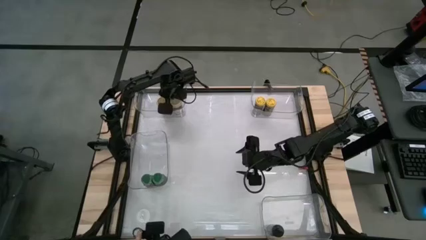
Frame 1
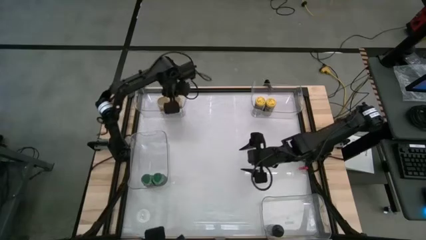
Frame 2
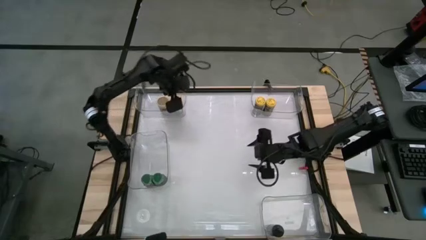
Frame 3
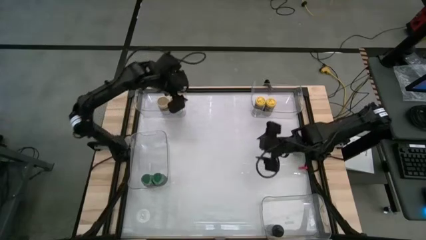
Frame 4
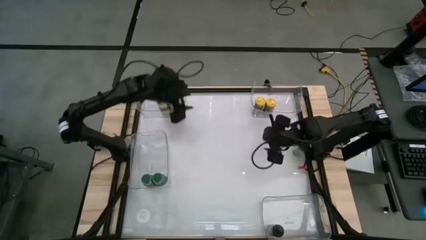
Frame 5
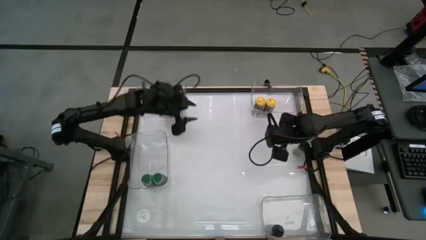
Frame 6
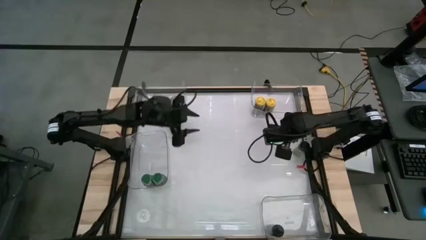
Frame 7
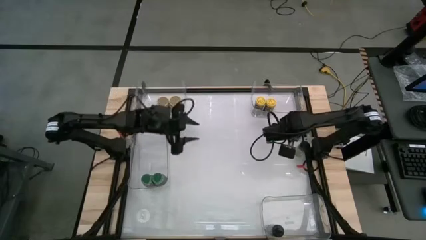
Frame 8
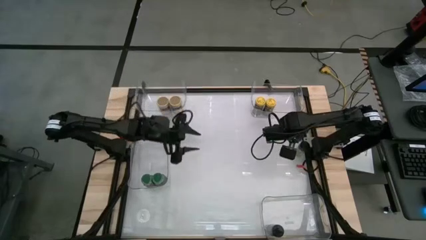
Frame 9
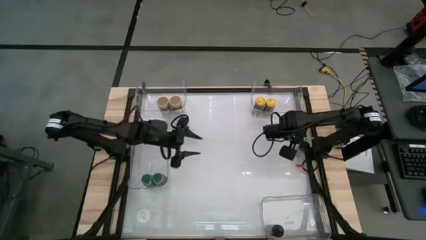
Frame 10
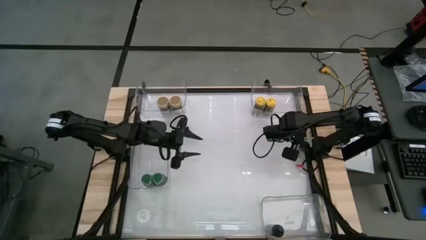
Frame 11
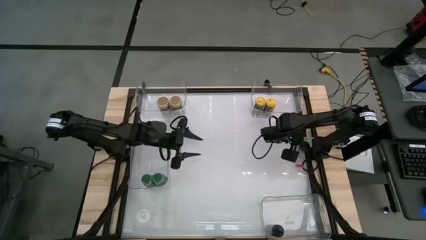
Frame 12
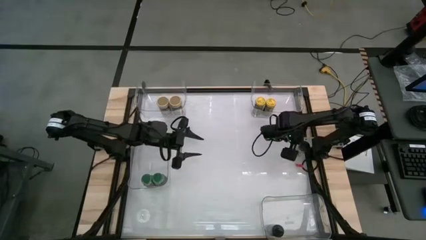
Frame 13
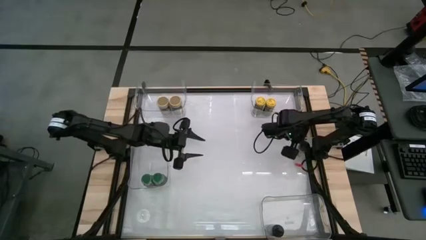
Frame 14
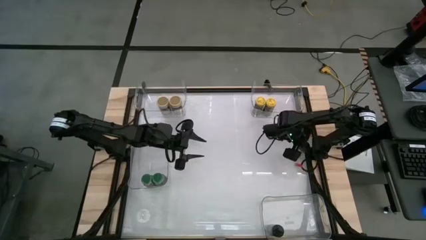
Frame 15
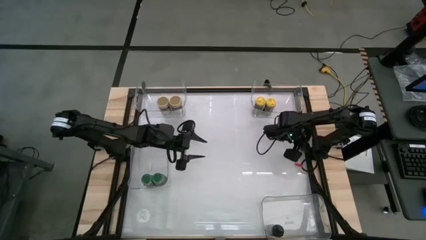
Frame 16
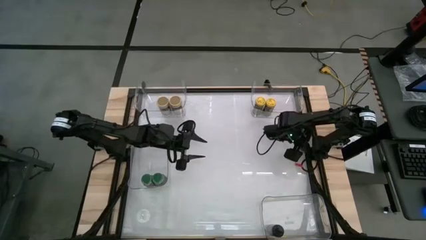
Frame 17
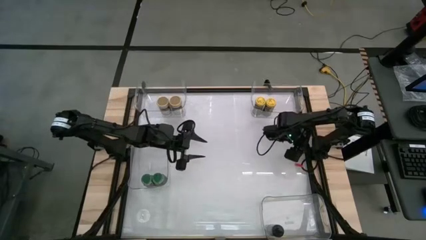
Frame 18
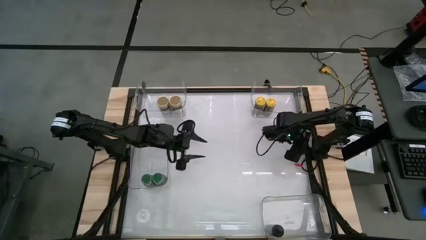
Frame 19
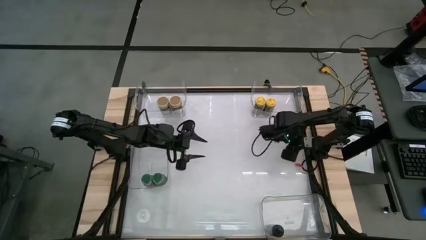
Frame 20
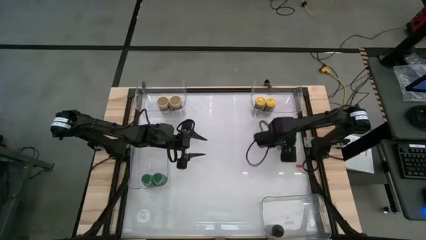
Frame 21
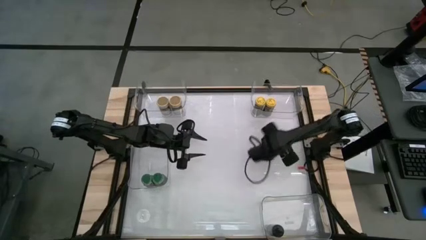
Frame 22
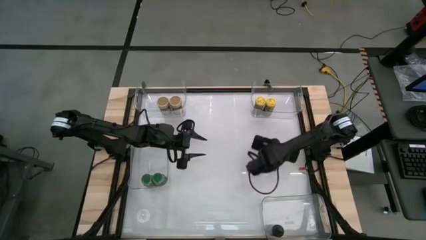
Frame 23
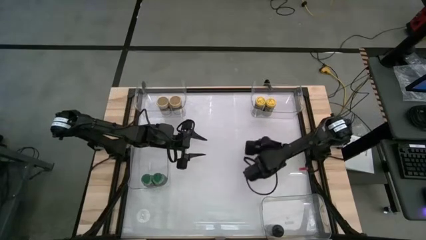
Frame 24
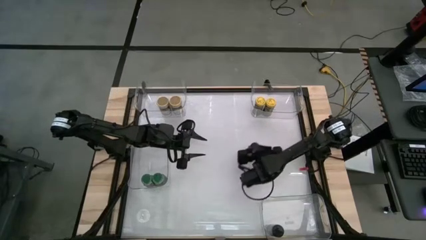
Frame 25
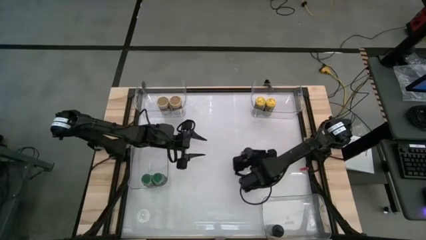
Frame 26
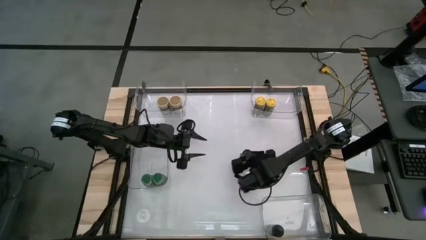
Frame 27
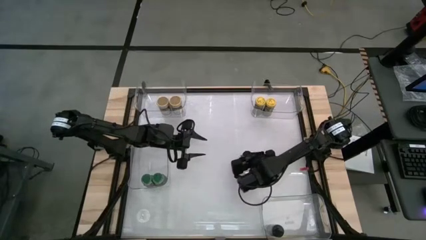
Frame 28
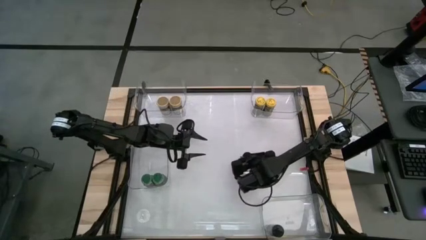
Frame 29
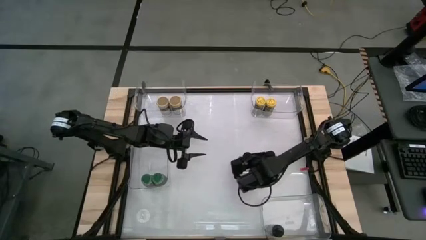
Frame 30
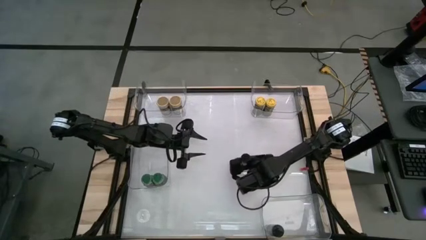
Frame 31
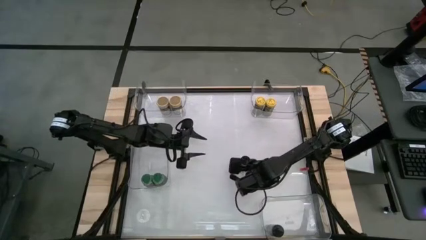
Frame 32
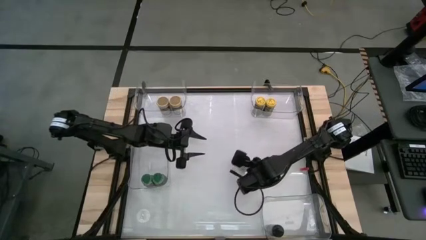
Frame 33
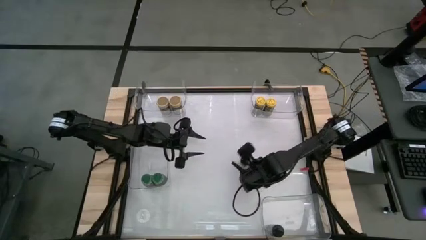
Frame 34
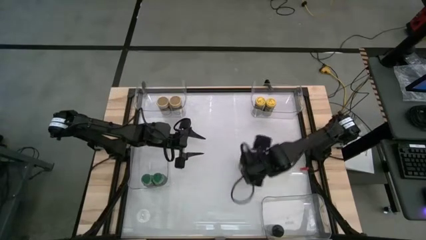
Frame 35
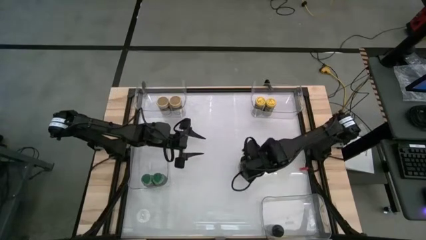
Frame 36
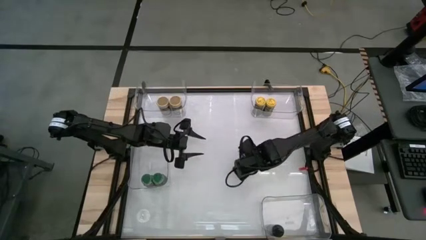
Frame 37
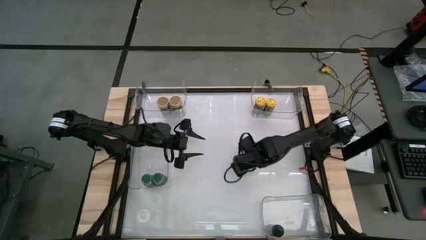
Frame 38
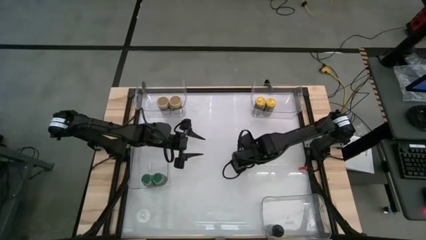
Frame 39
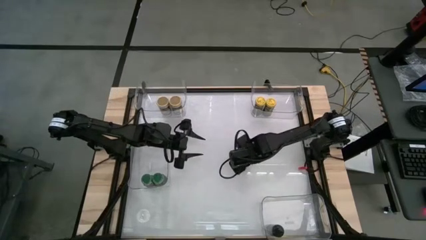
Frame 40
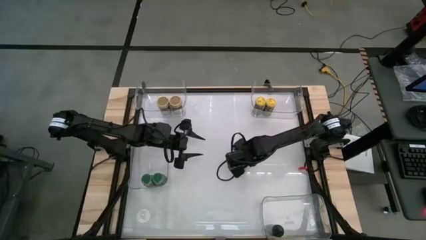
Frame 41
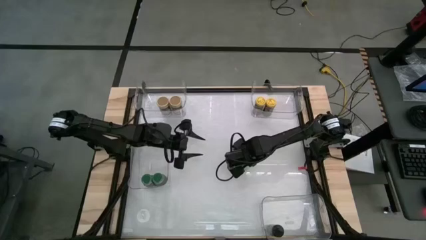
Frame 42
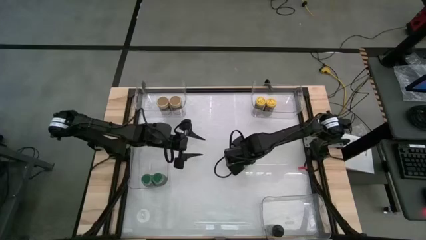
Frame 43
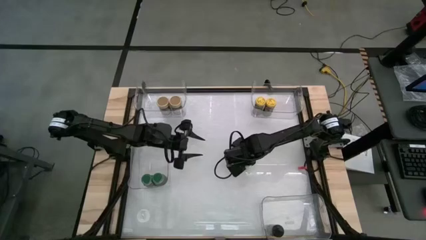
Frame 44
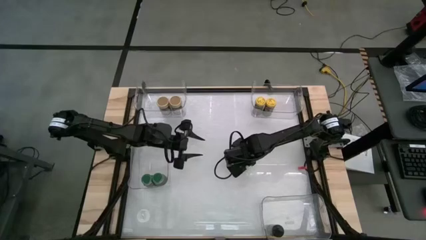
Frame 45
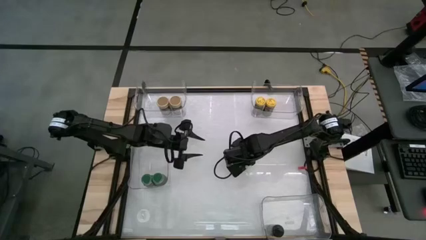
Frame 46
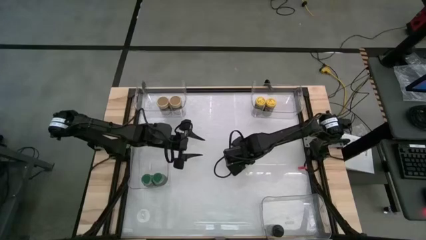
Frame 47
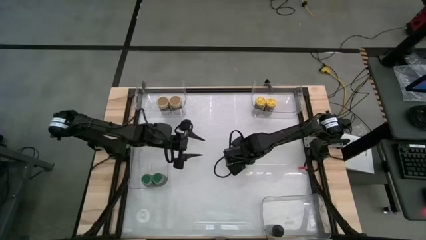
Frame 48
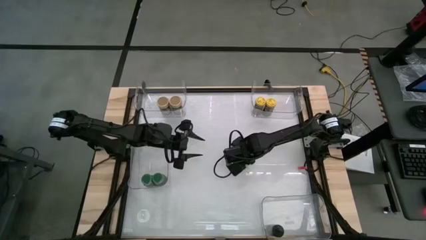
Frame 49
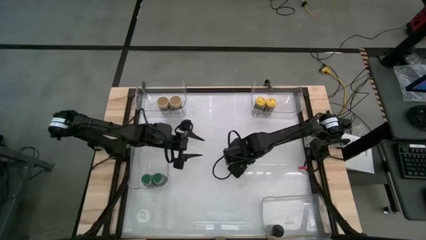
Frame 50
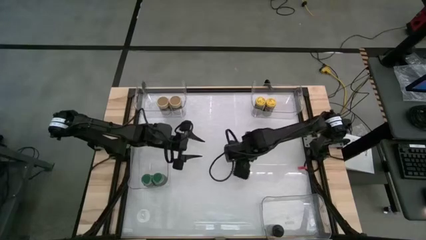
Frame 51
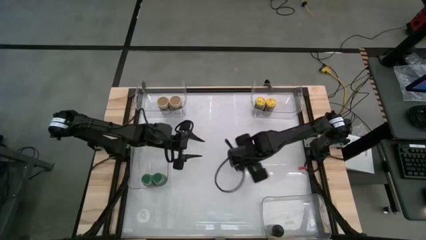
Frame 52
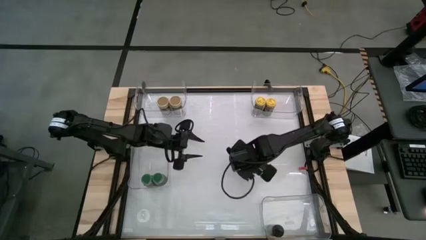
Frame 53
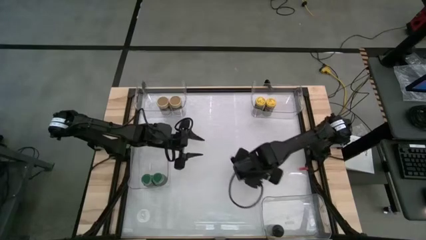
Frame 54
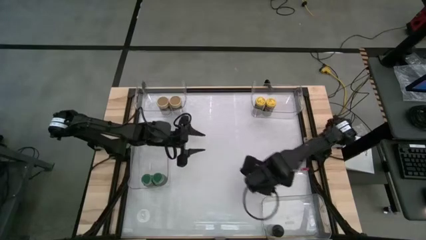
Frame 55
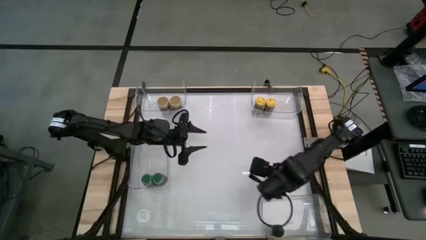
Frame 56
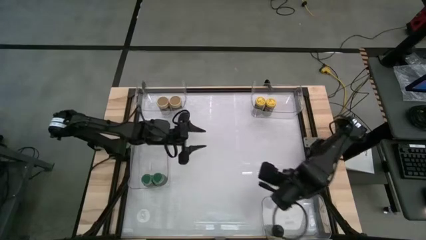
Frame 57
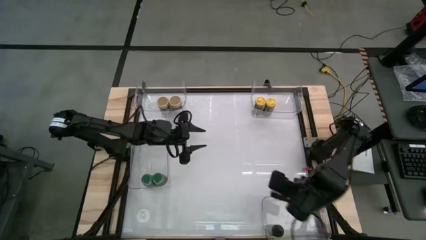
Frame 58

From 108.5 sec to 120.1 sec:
Task: Sort spices by type
Put the black seasoning bottle into the bottom right transparent bin

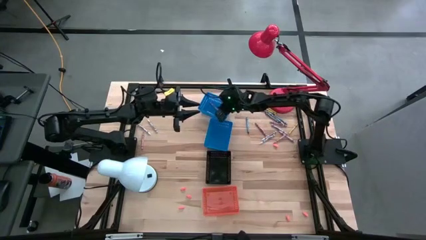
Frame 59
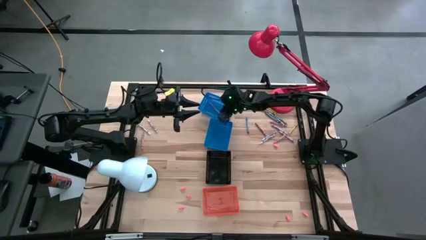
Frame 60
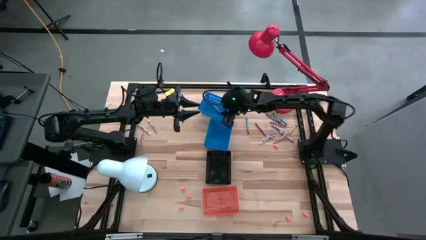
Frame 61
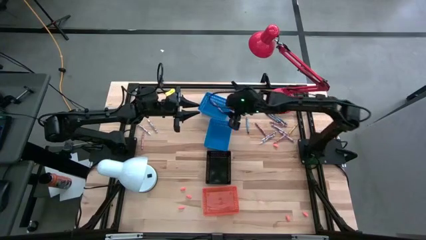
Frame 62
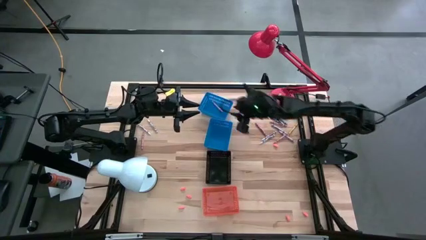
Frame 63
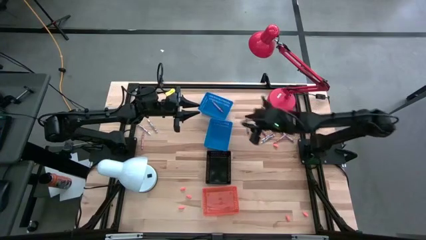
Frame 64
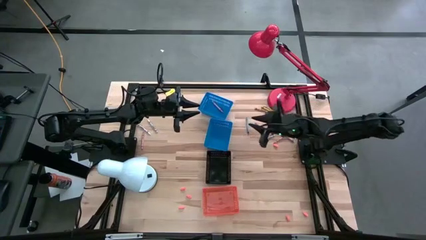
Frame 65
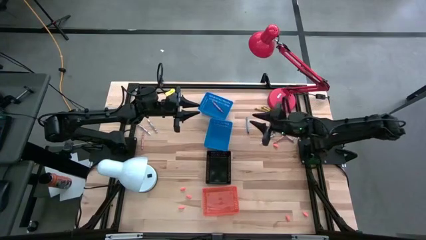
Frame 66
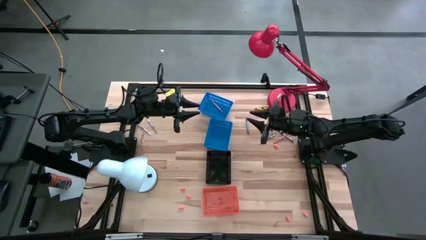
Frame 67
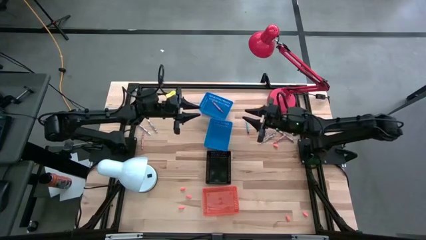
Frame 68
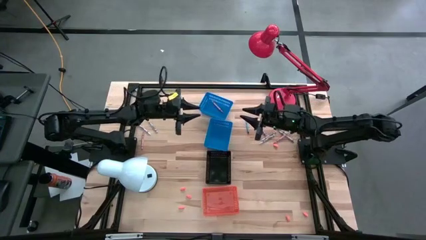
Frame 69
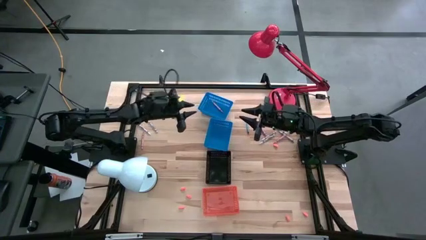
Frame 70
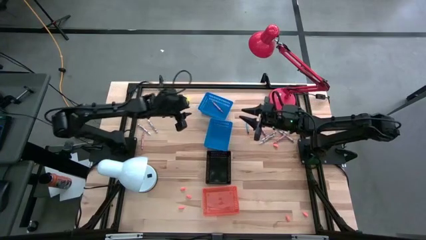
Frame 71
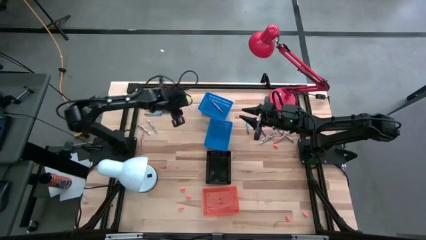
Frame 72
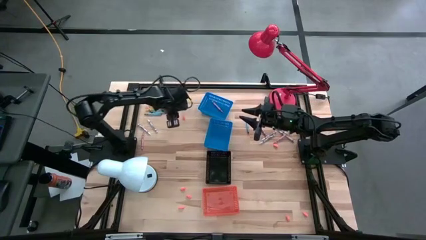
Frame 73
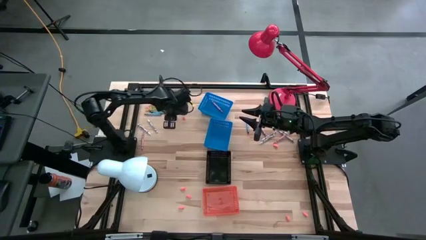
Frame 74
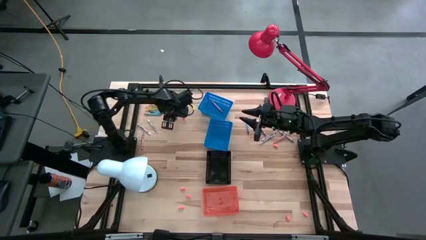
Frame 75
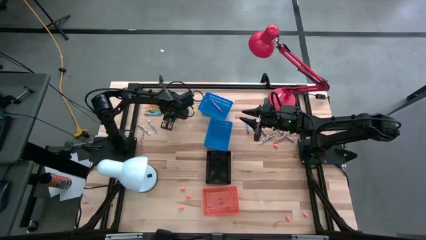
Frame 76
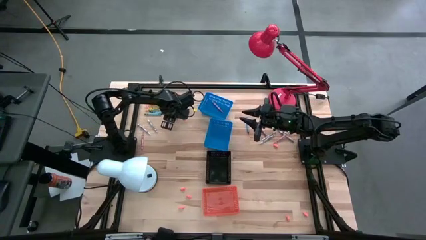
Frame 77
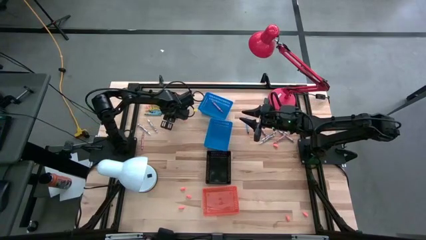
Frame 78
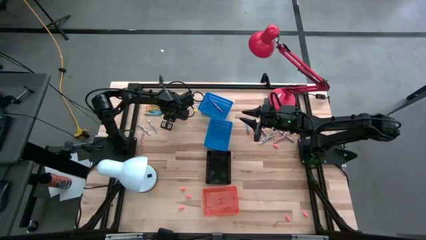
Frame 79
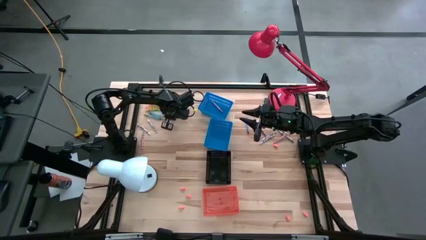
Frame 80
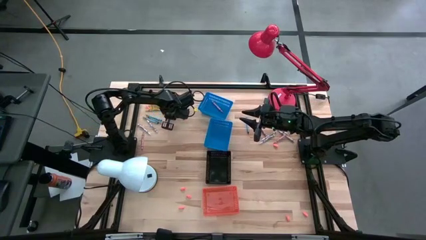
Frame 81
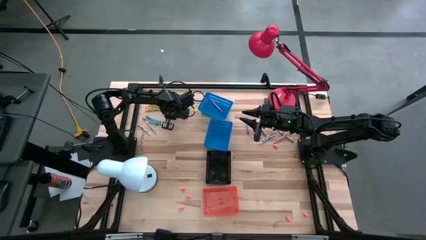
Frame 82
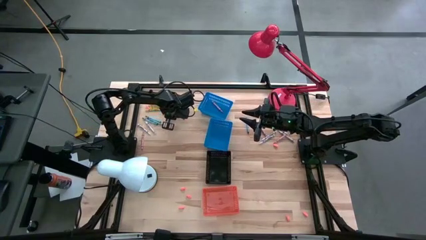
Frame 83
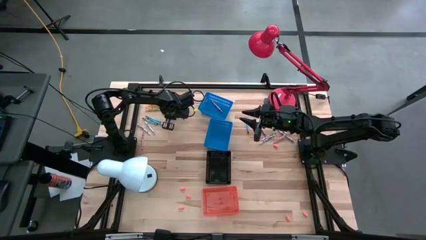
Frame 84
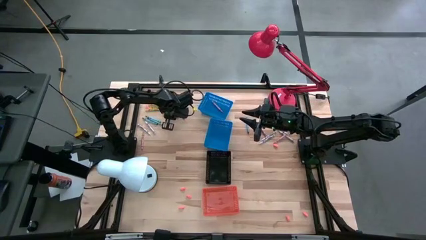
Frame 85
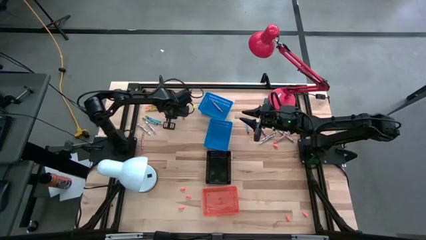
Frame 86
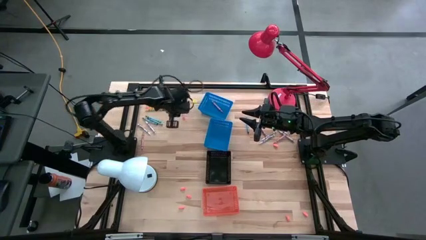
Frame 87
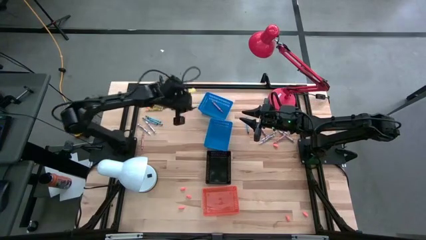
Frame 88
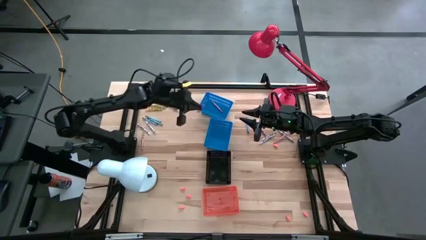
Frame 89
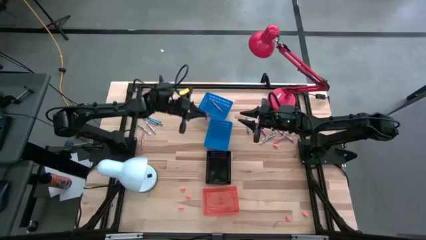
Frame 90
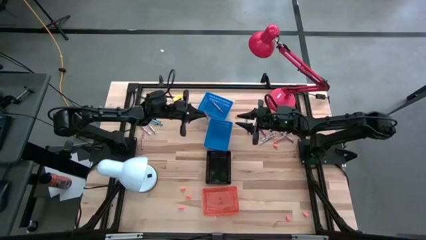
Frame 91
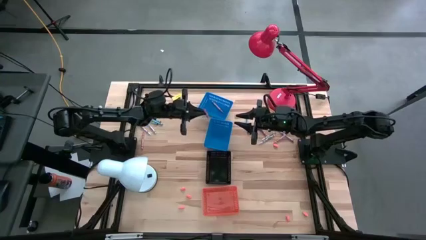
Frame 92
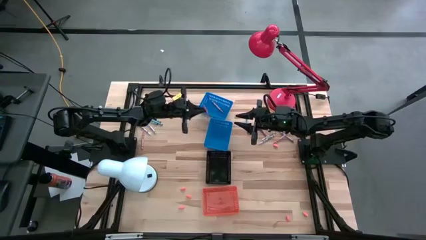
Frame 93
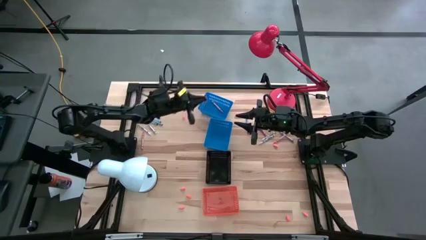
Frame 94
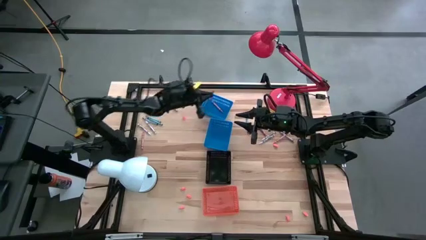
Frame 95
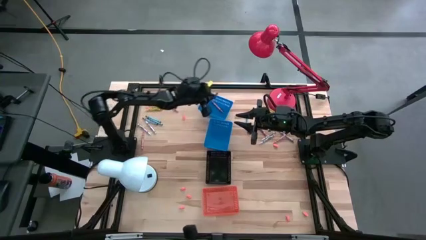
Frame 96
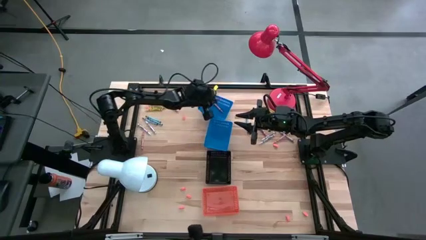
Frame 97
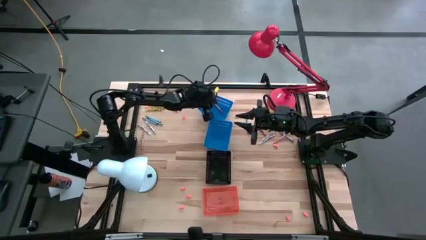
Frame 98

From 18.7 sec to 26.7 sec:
Task: Sort crayons
Put the pink crayon into the top blue bin
